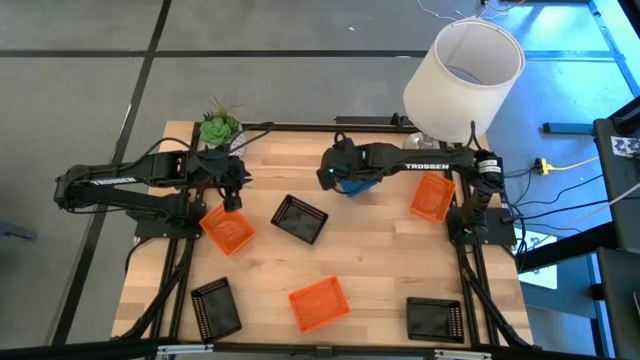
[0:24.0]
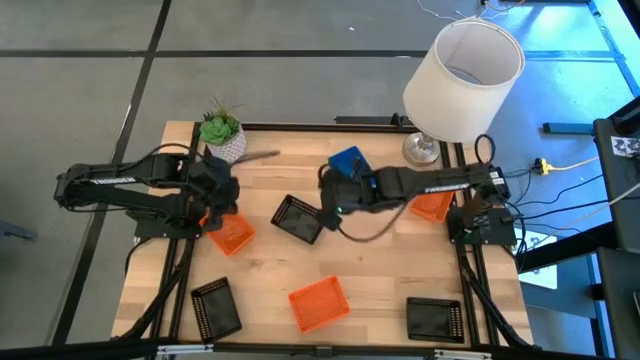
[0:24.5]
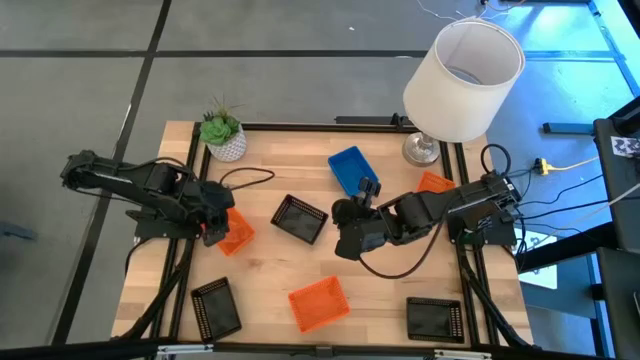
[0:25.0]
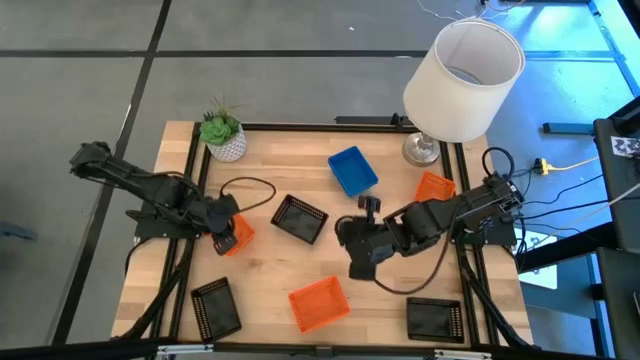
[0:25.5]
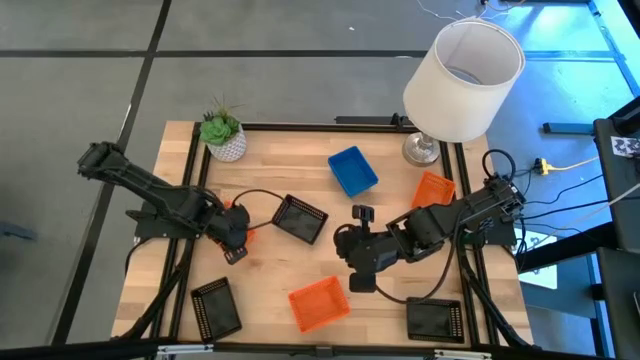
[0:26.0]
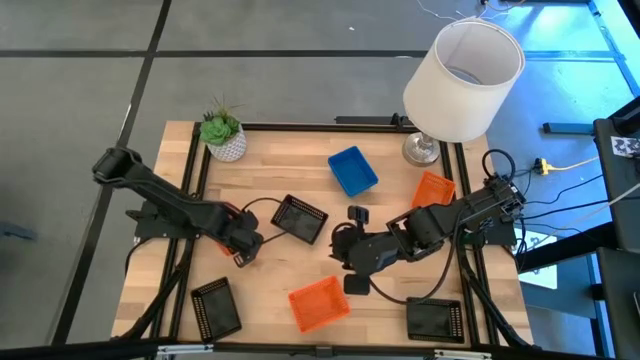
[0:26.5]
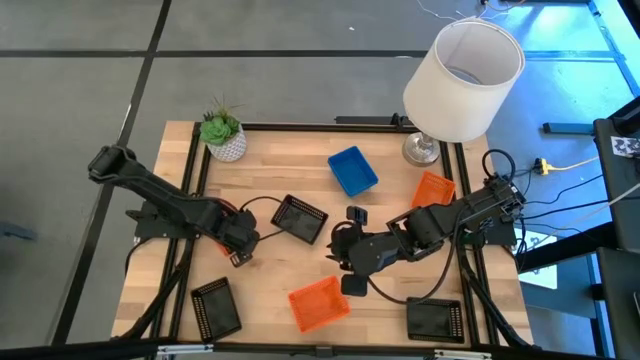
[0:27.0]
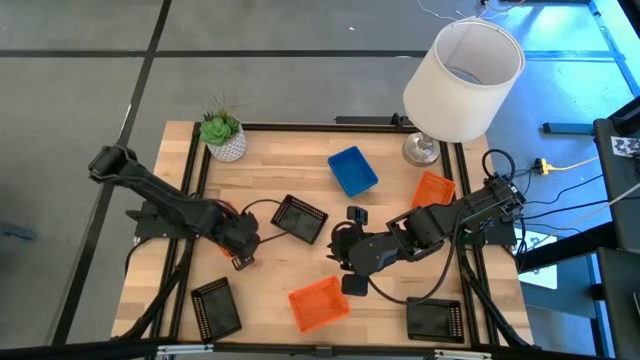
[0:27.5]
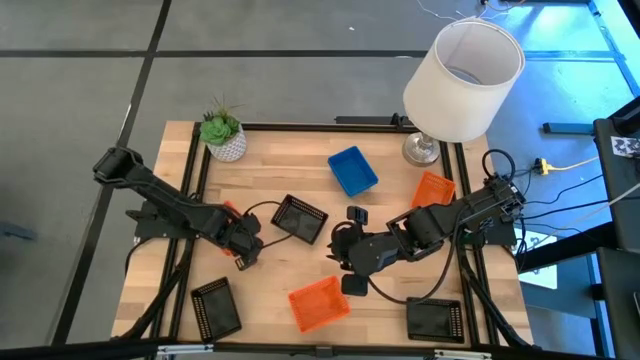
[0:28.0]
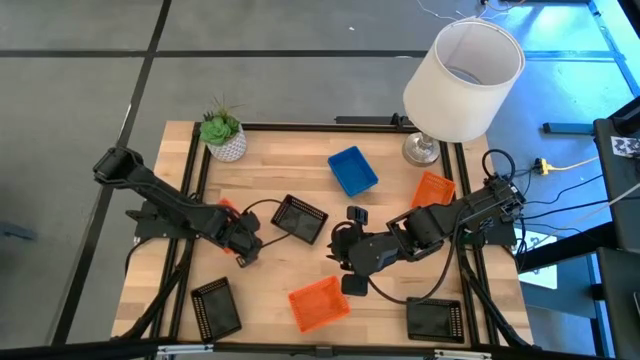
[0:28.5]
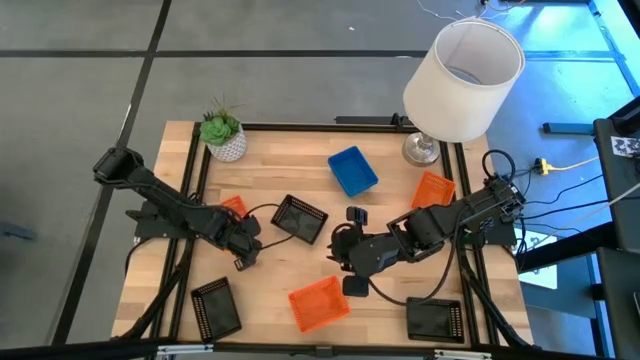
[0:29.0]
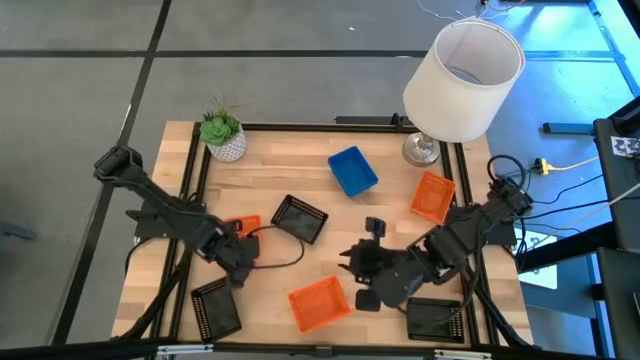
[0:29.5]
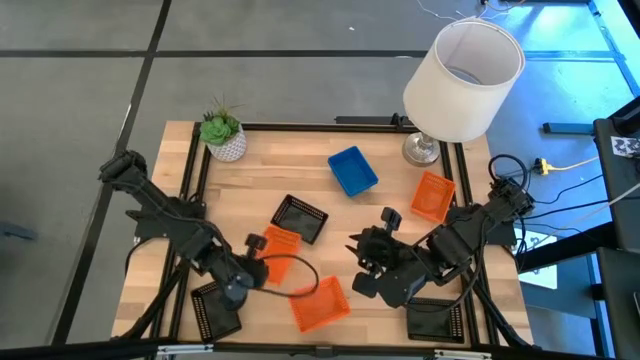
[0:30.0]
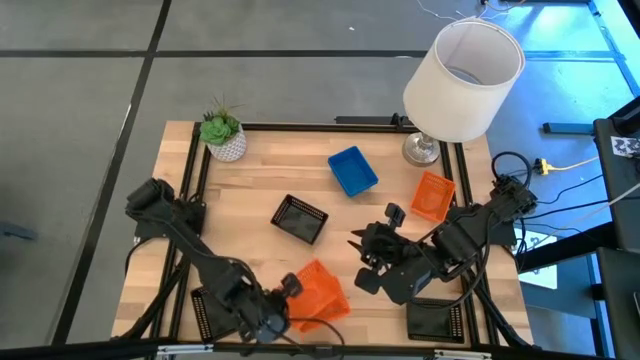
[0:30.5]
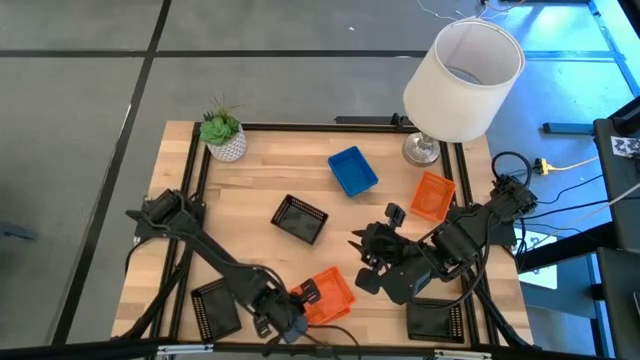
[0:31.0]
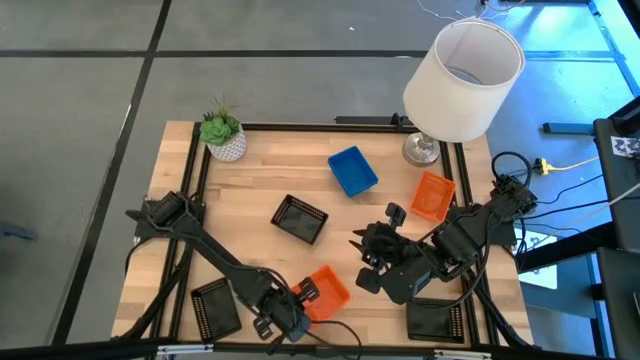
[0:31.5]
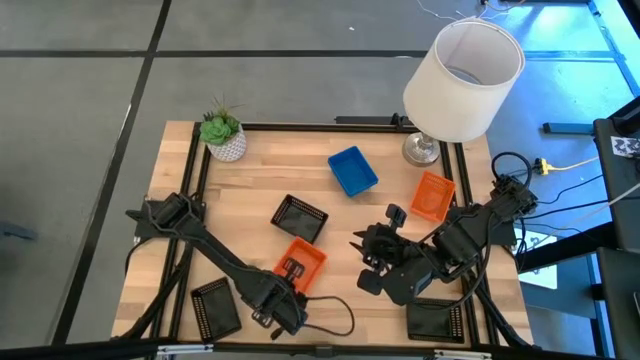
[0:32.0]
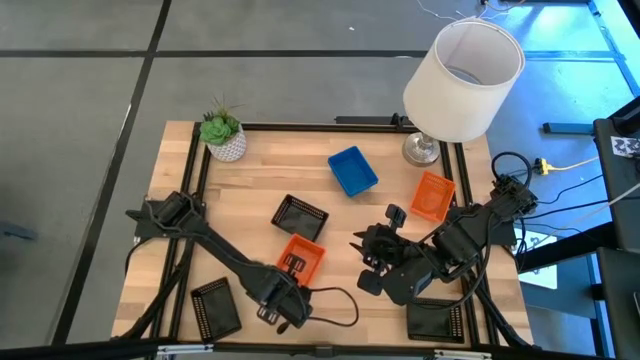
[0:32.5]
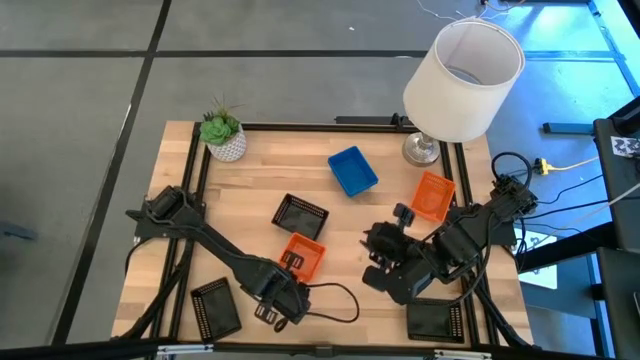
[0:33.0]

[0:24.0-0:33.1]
Stack the left orange bin on the bottom orange bin

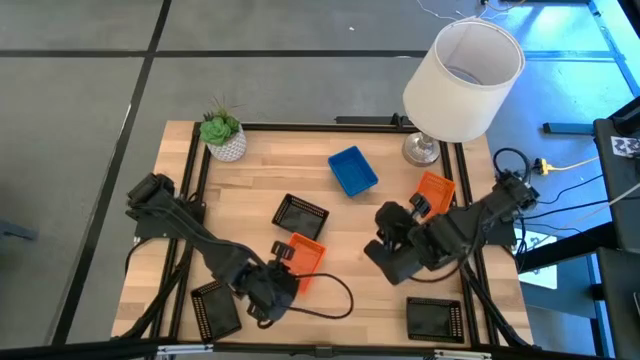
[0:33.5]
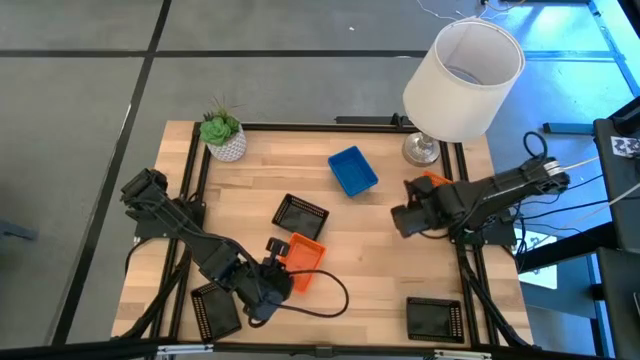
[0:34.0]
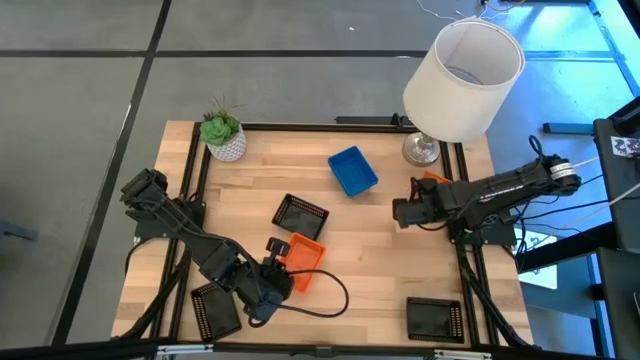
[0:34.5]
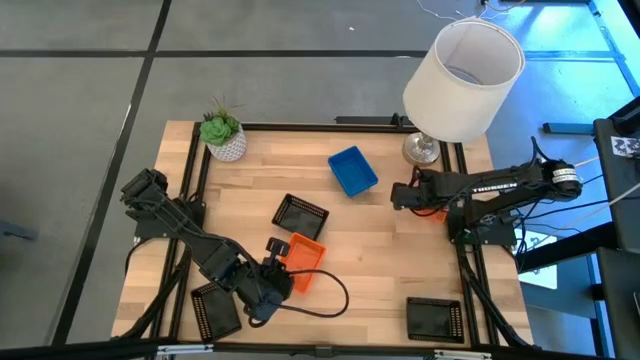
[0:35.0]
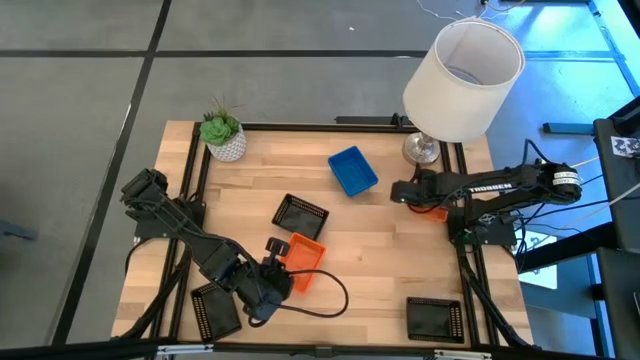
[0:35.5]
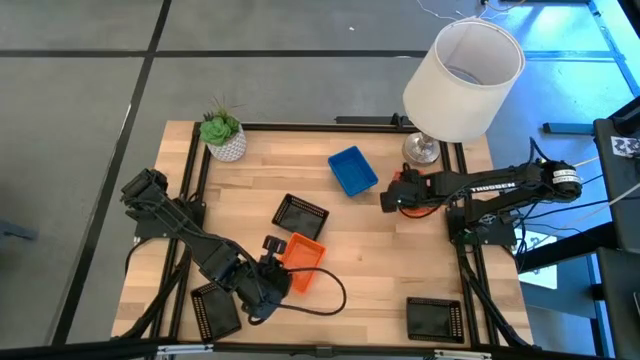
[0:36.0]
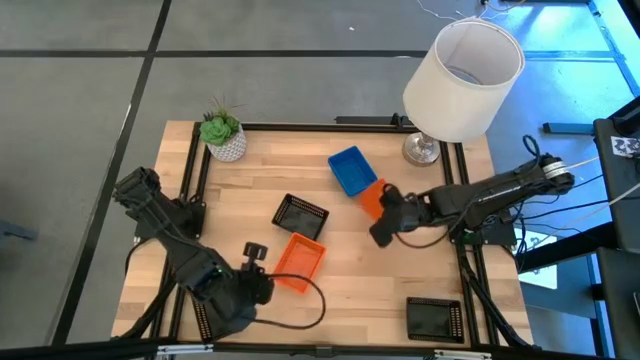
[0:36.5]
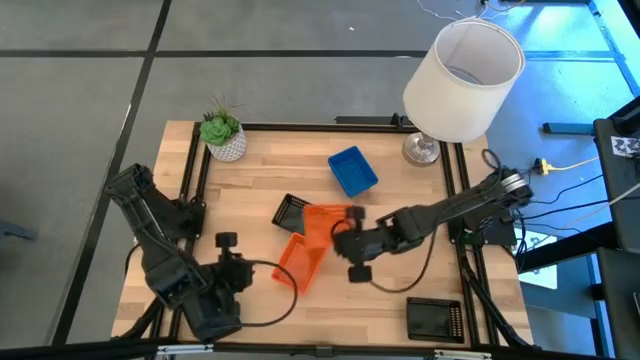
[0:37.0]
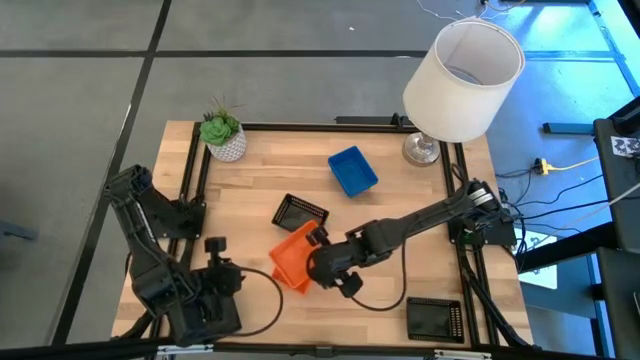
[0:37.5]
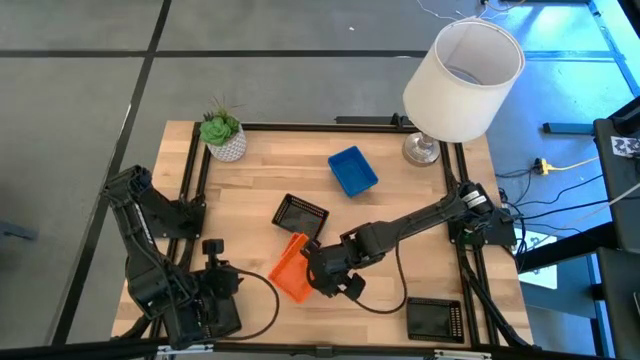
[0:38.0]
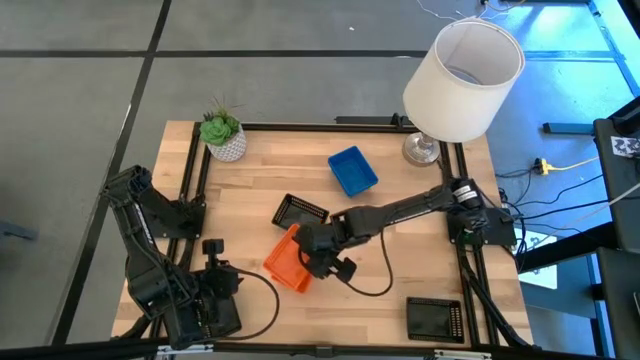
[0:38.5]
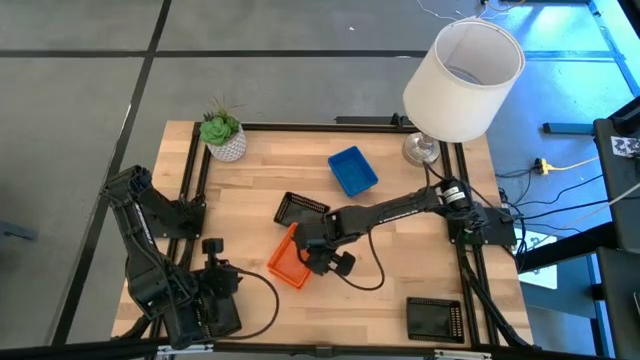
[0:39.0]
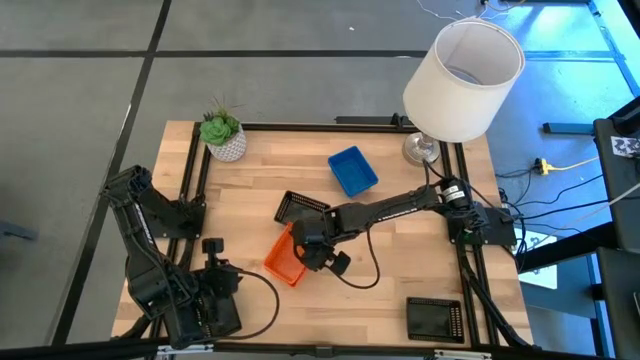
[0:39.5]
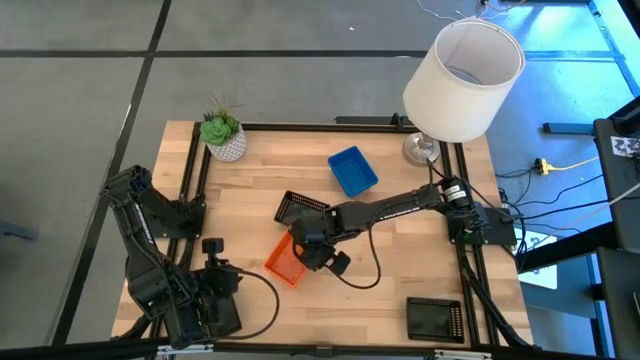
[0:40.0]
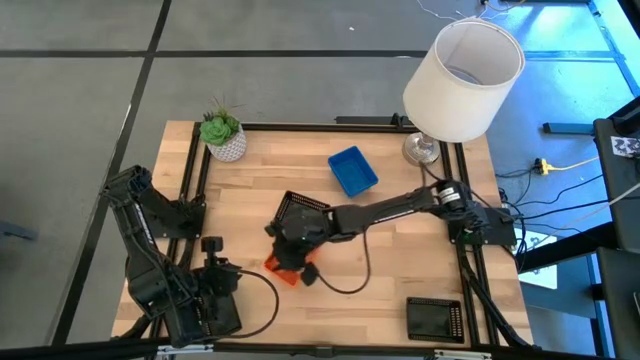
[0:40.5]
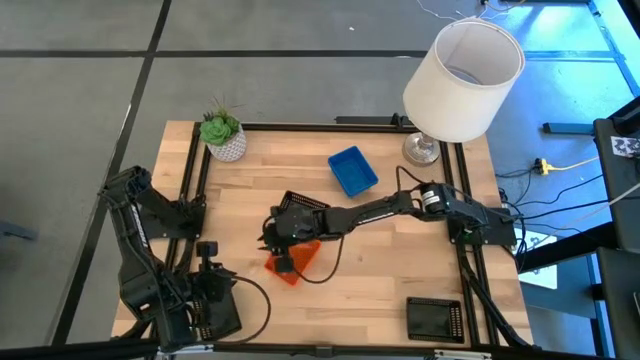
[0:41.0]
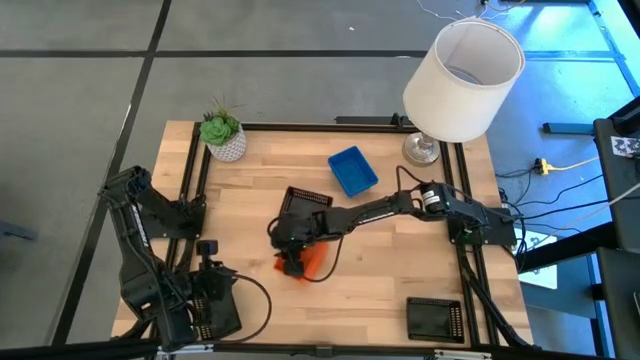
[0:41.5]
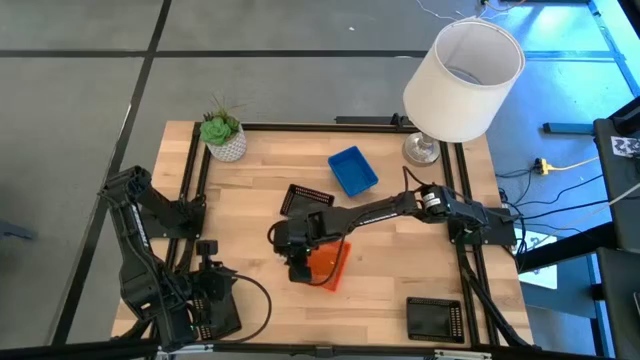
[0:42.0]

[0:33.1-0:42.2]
Stack the right orange bin on the orange bin
